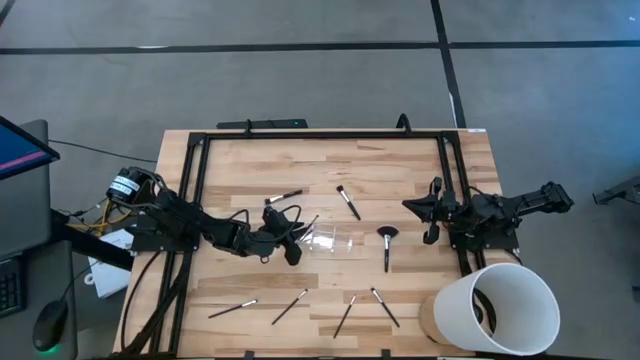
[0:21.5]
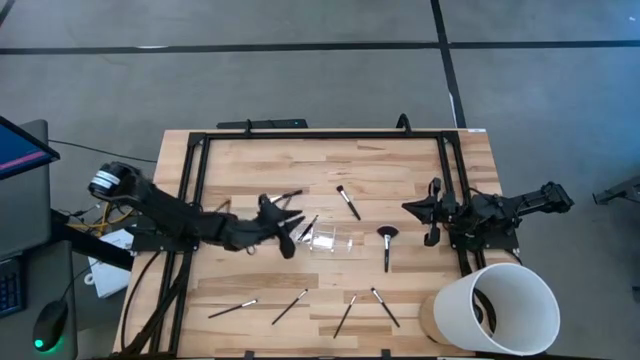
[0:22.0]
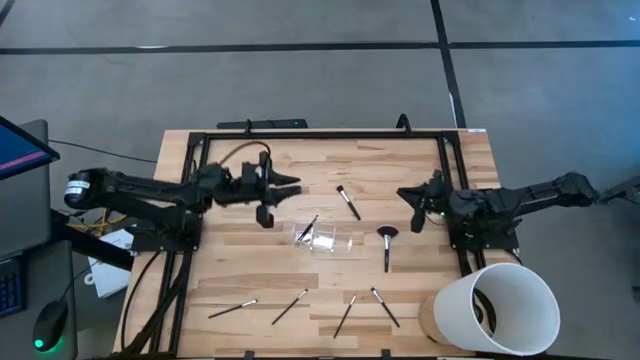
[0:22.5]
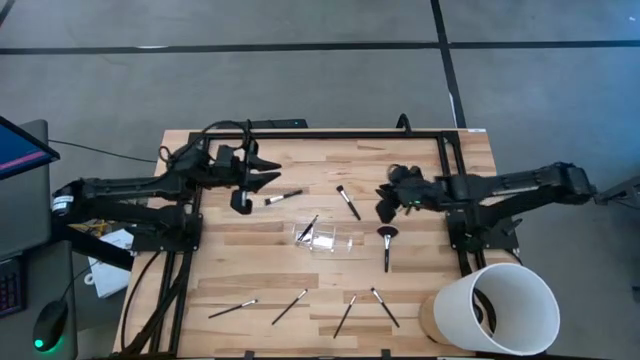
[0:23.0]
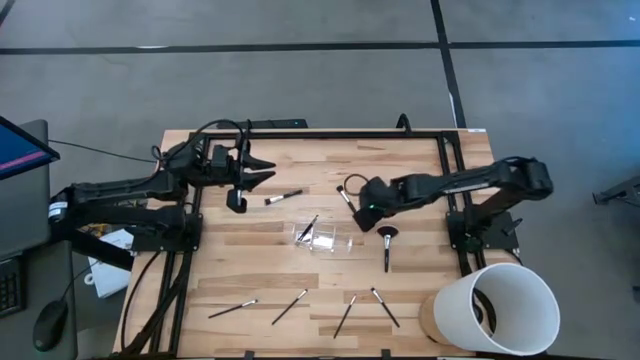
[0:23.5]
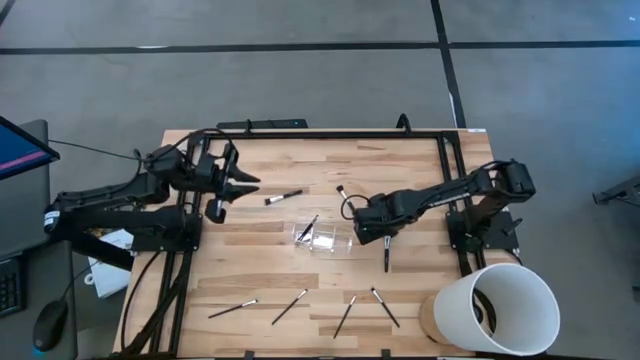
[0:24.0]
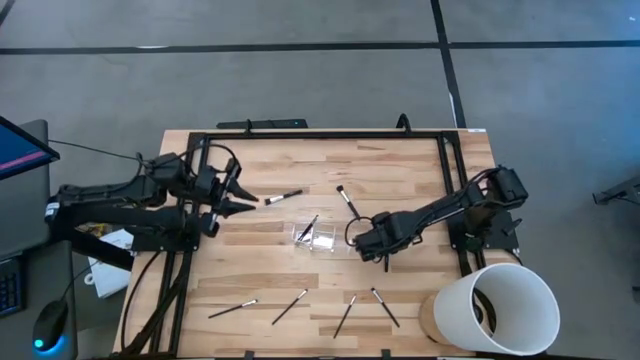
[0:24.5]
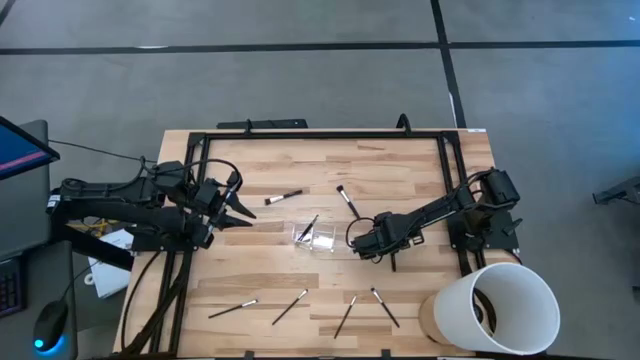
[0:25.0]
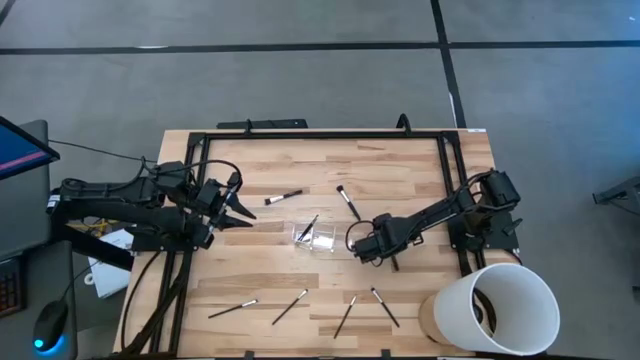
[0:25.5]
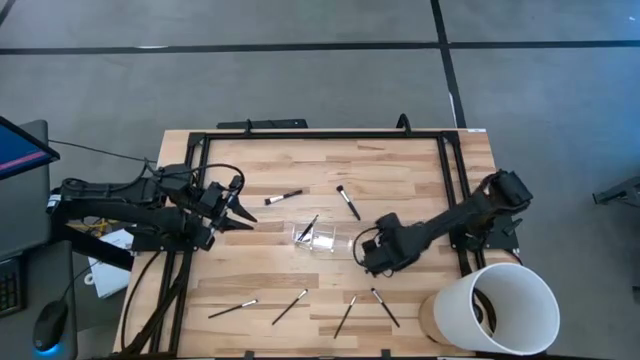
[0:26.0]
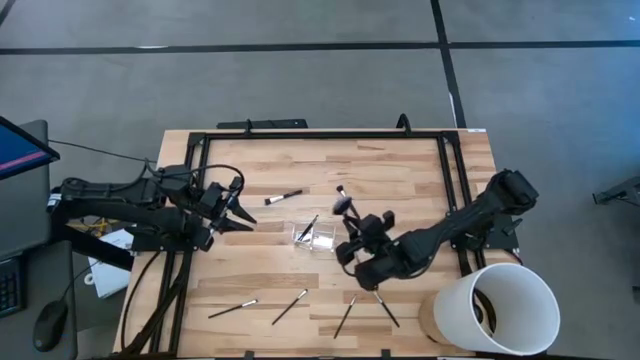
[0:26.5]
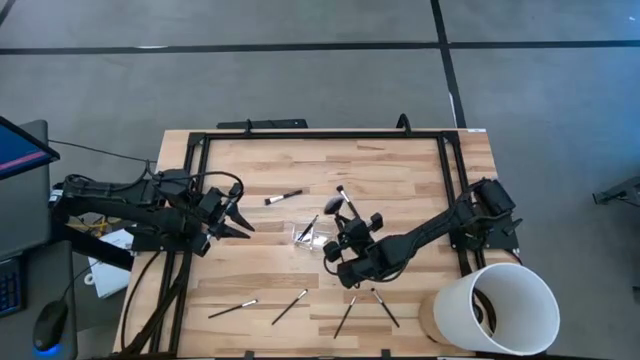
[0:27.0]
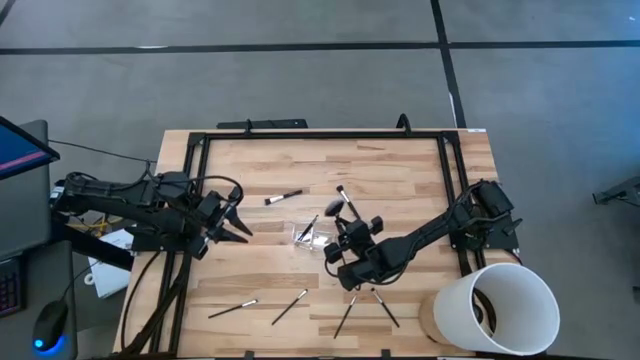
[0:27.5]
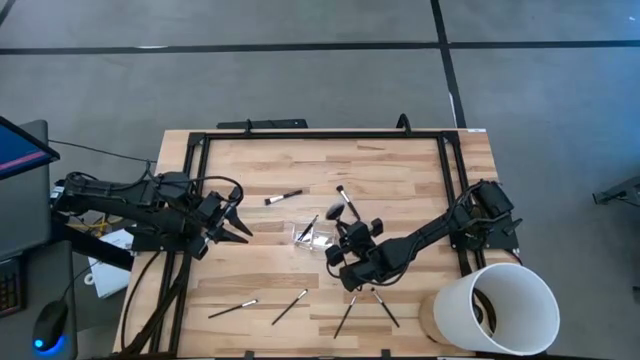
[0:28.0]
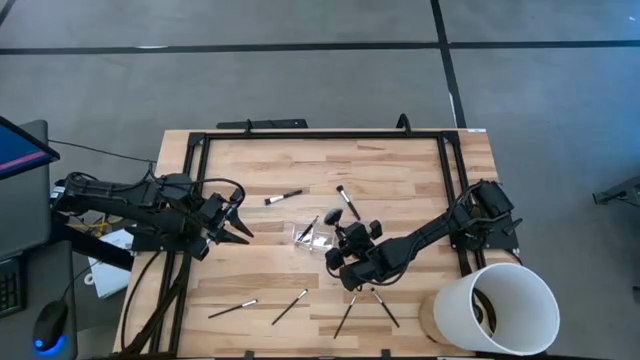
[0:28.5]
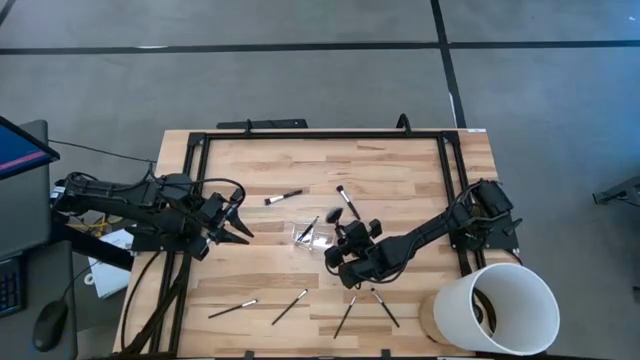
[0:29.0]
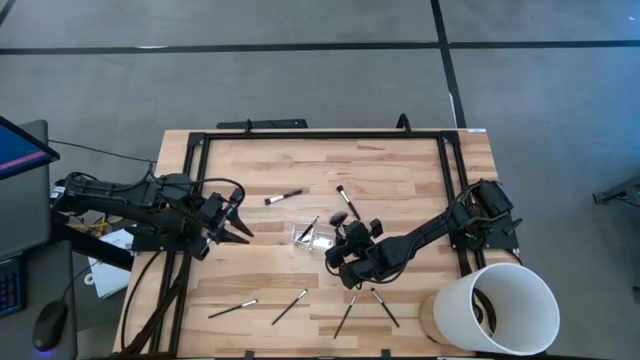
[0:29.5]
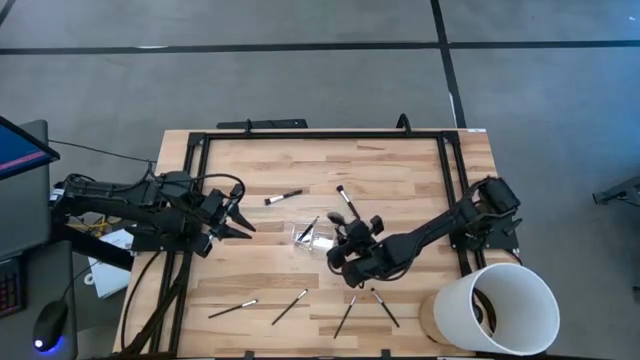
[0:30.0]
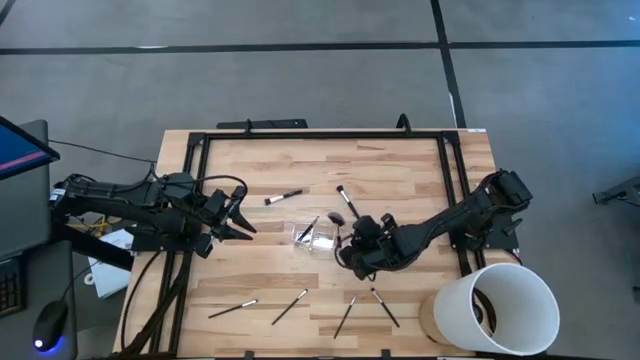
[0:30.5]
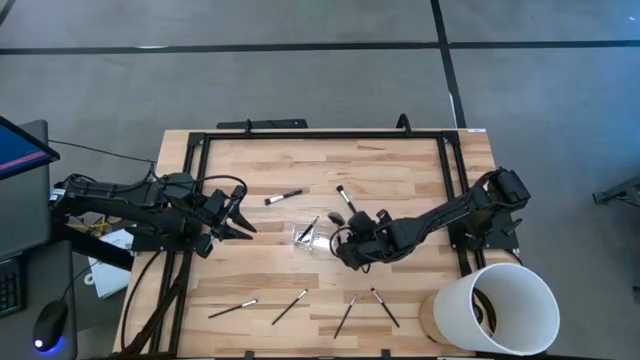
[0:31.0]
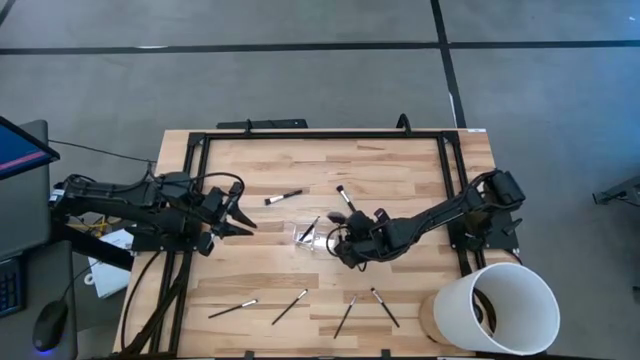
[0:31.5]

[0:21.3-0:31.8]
Task: Put items in baskets/containers
Put the highlighter brush into the right section of the transparent organizer

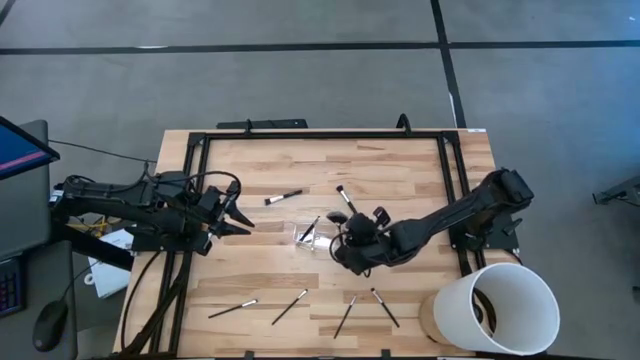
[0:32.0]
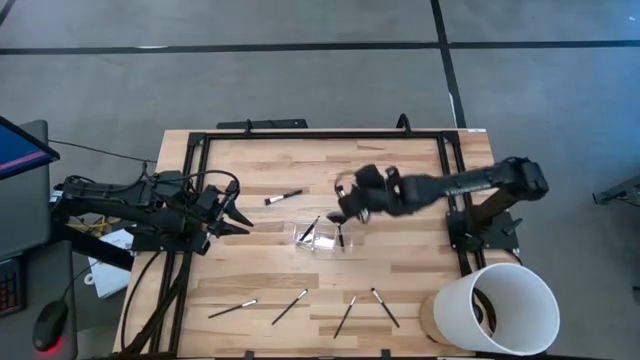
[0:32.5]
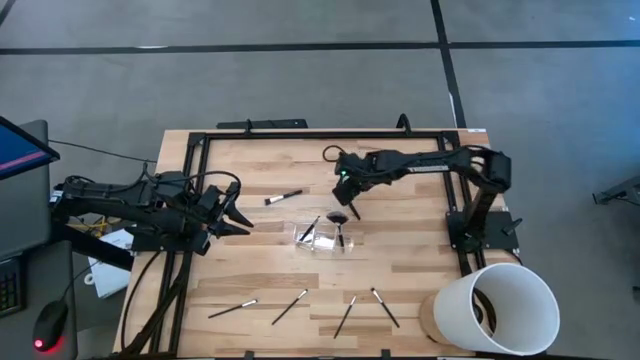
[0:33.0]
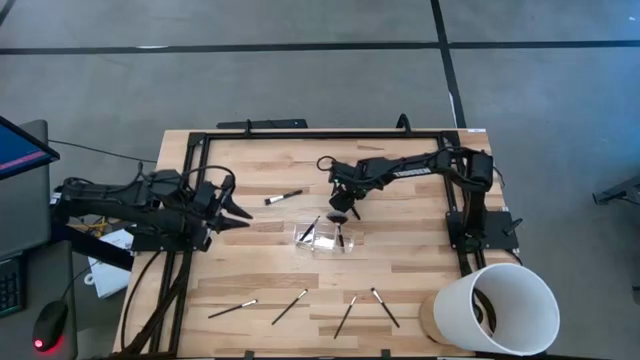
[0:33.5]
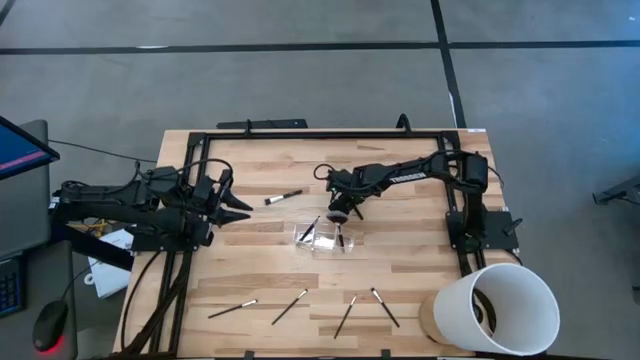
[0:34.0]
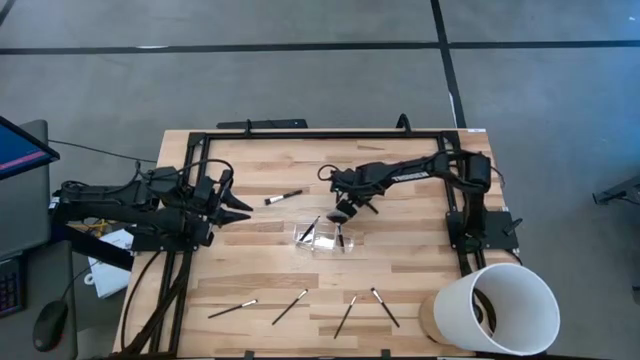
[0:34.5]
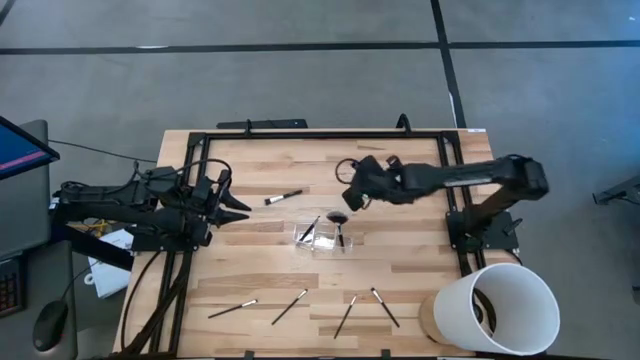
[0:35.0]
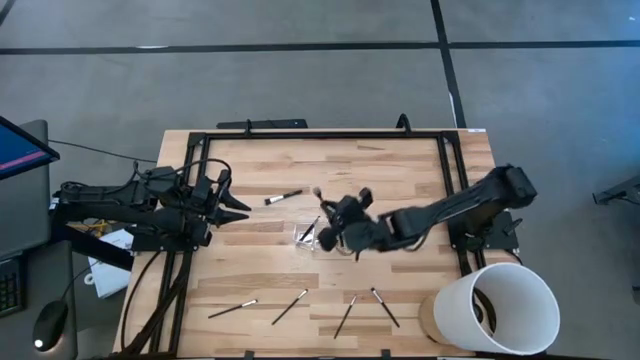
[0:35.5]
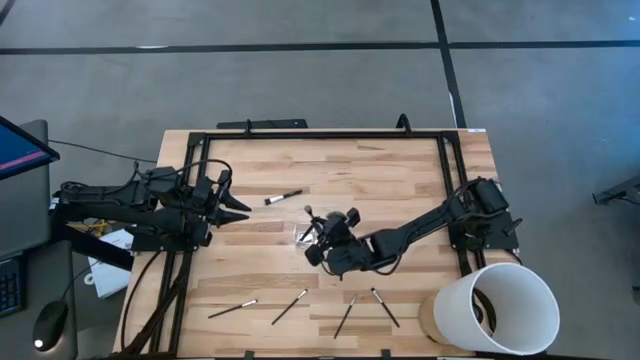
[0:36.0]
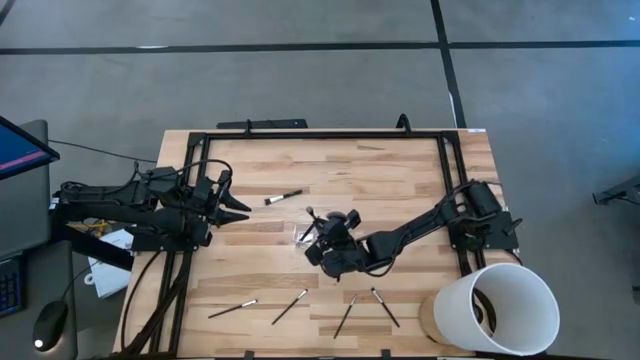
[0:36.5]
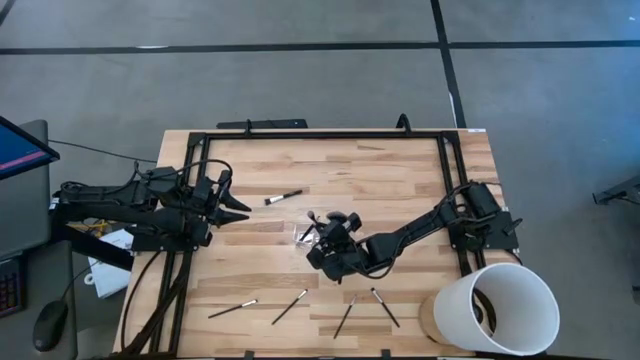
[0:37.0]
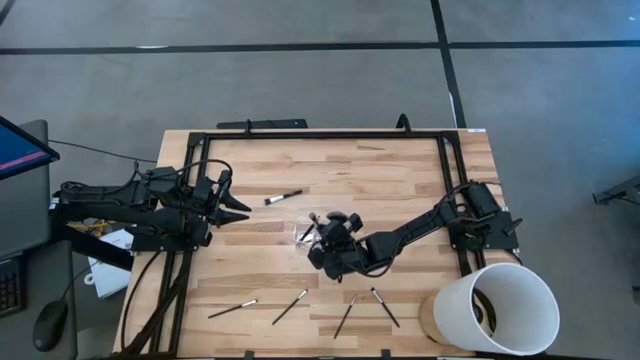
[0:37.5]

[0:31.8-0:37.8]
Put the powder brush into the middle section of the transparent organizer

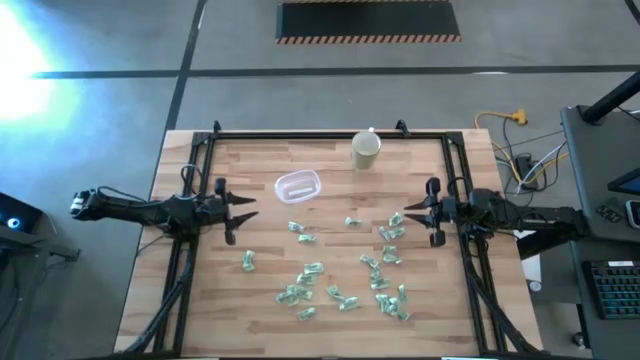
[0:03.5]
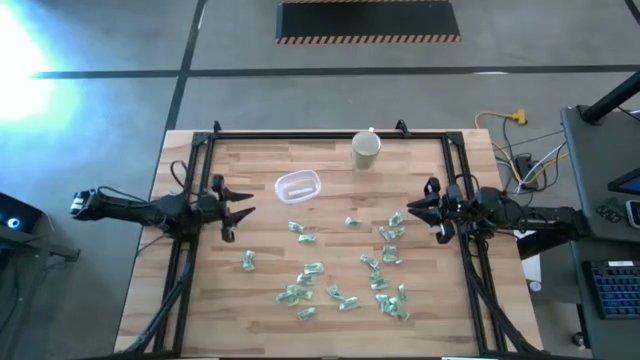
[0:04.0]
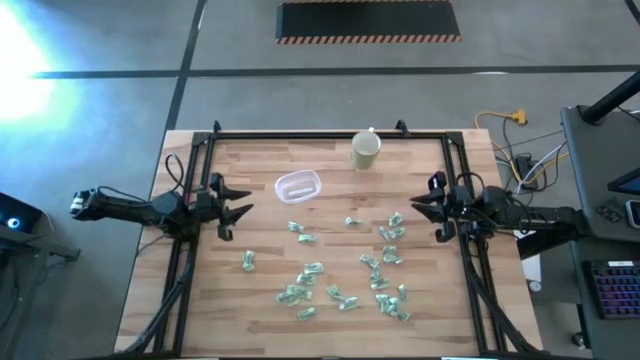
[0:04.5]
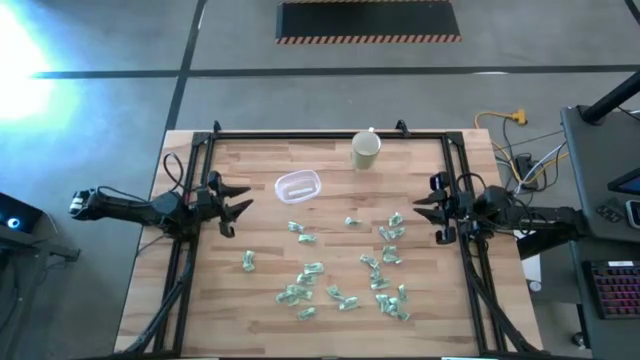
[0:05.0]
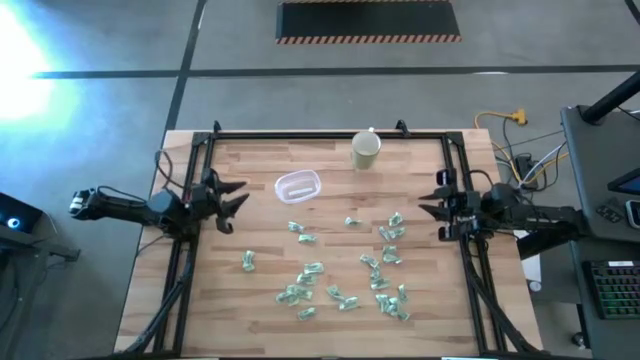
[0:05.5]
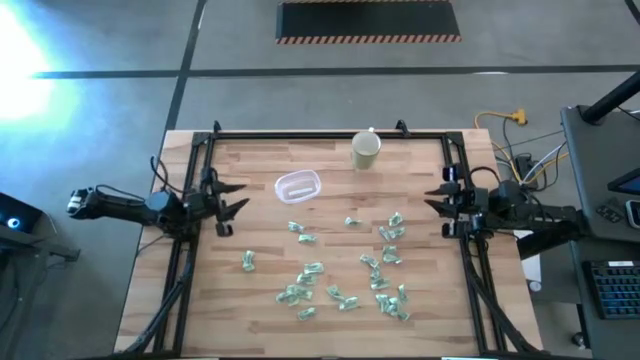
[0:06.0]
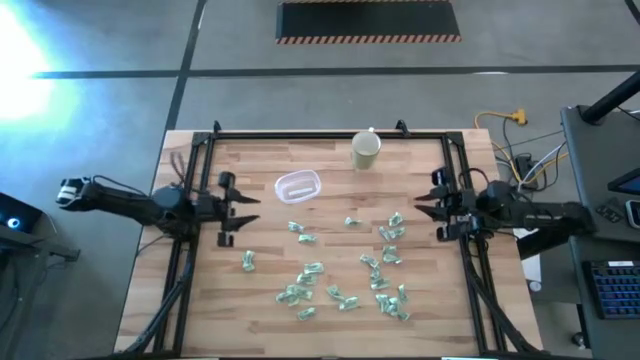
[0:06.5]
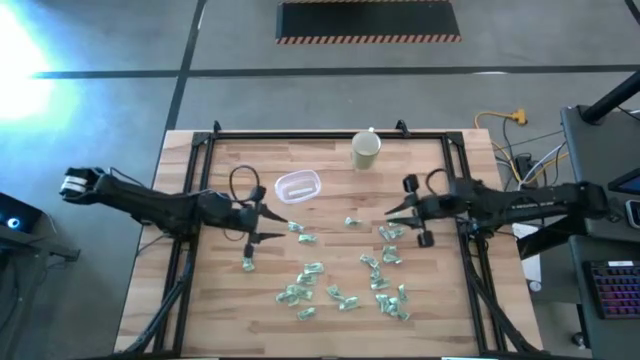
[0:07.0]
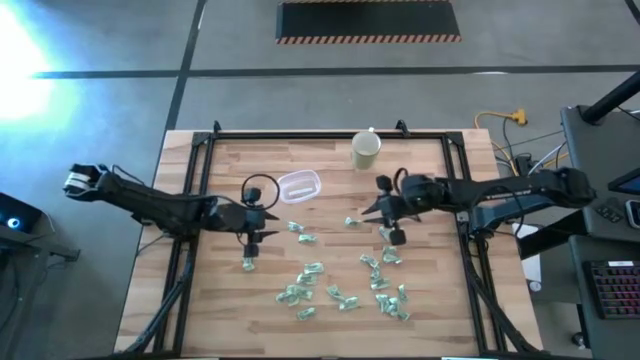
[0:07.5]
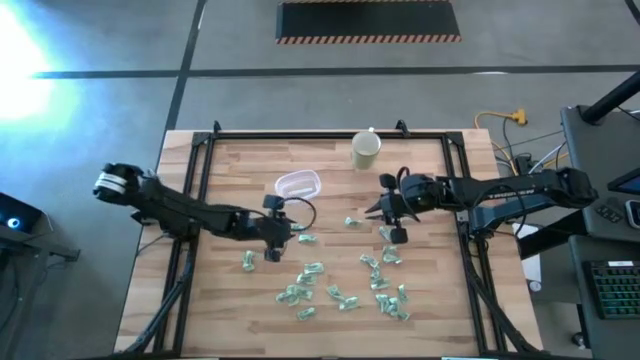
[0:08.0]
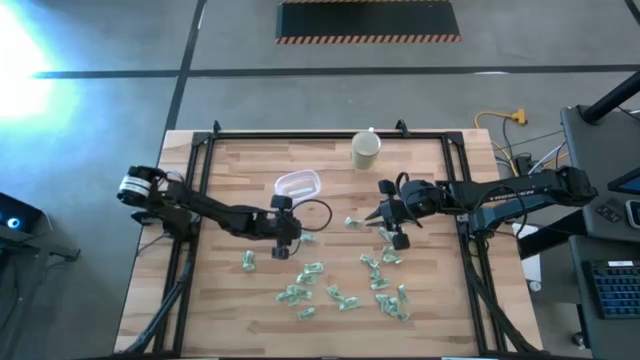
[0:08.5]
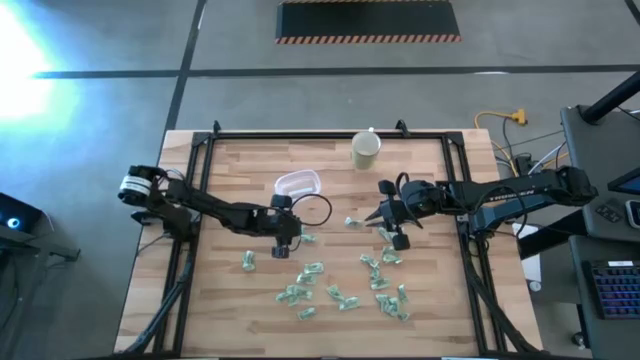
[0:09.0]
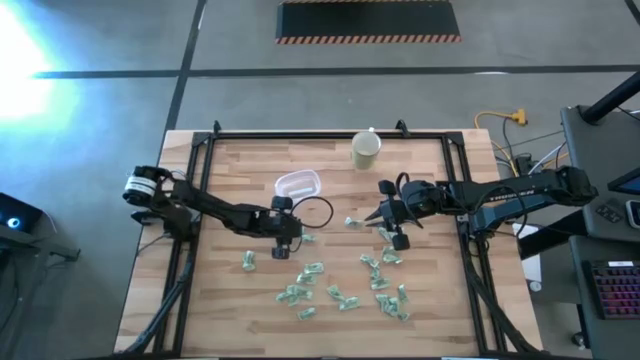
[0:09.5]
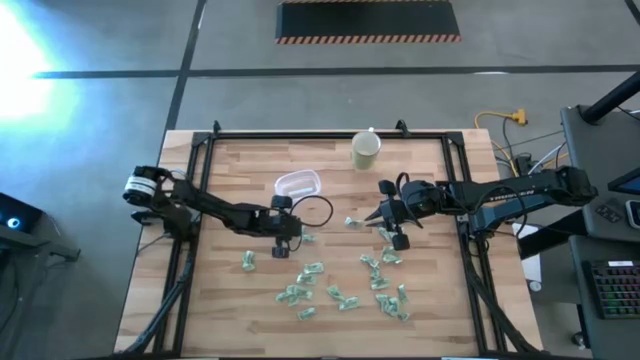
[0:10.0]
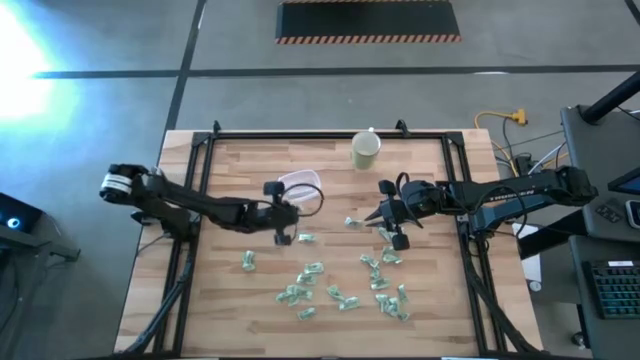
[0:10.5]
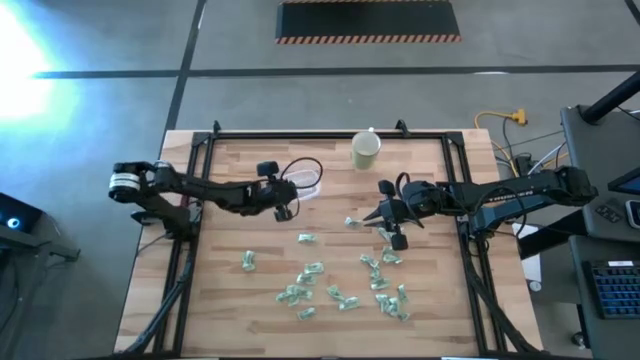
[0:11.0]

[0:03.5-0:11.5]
Task: Pick and place Stevia / Truvia into bins
Put the stevia packet into the transparent container
